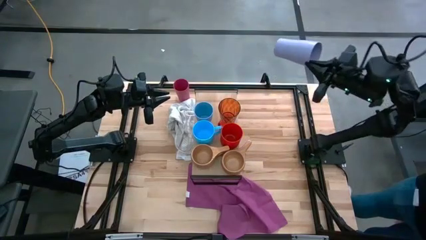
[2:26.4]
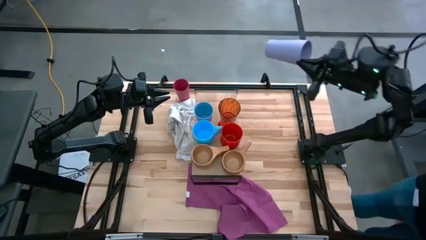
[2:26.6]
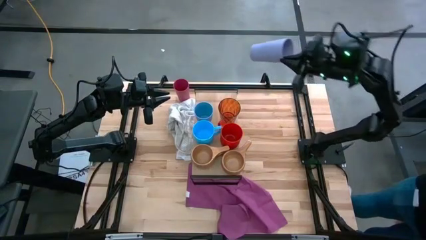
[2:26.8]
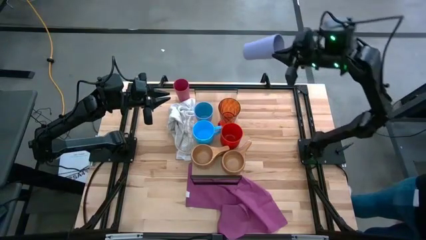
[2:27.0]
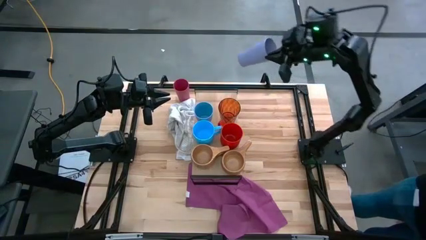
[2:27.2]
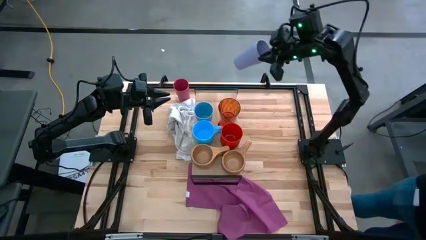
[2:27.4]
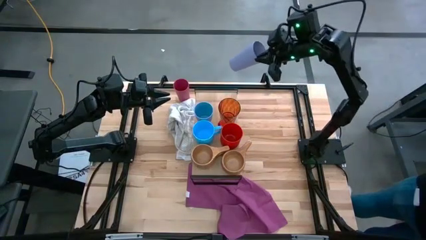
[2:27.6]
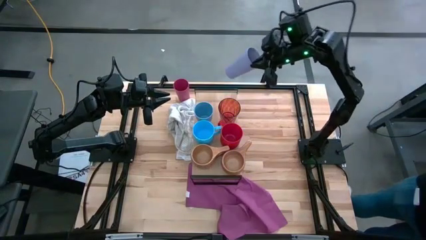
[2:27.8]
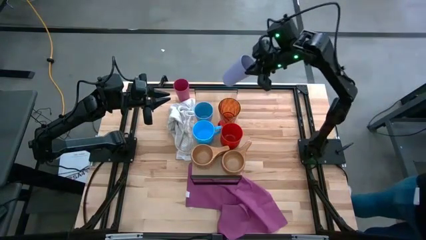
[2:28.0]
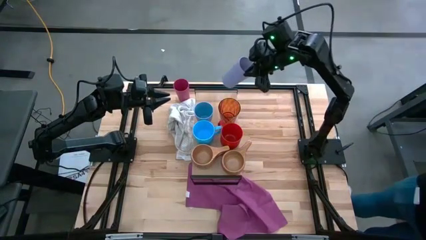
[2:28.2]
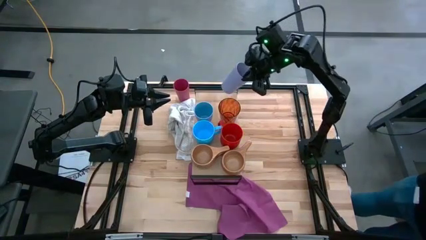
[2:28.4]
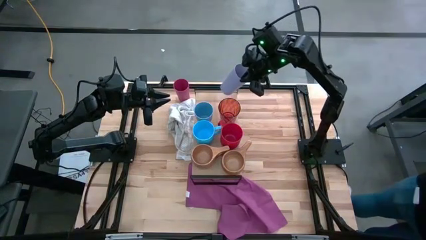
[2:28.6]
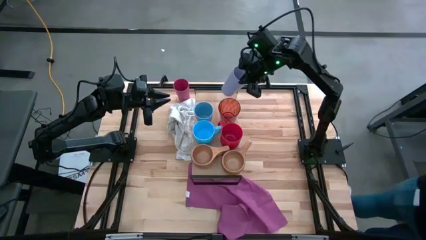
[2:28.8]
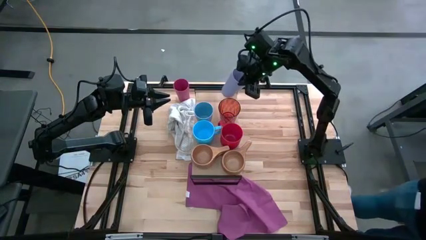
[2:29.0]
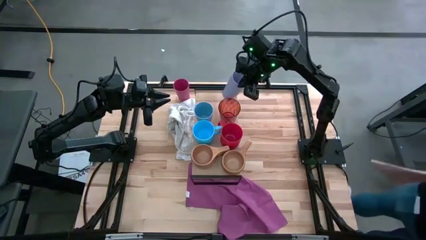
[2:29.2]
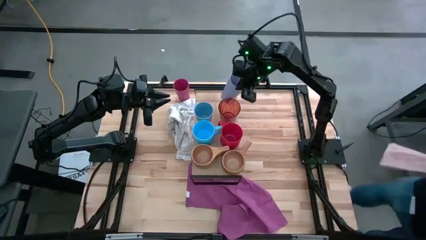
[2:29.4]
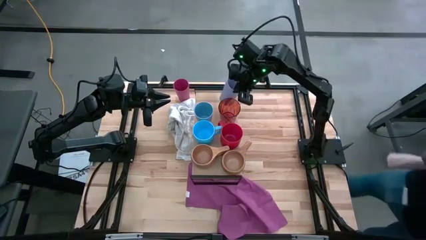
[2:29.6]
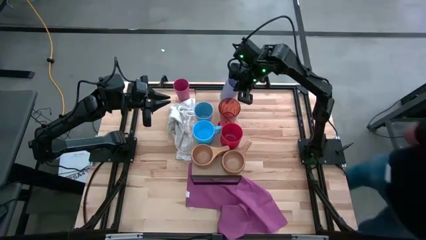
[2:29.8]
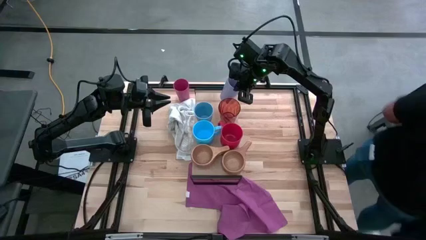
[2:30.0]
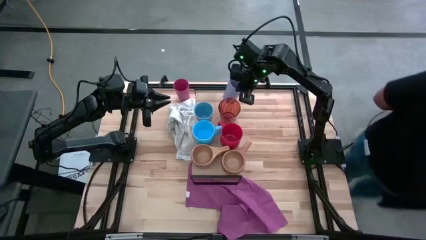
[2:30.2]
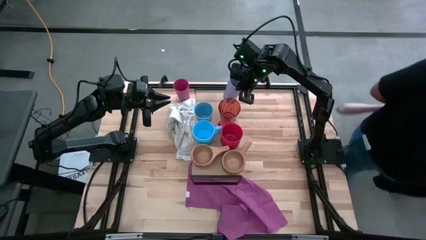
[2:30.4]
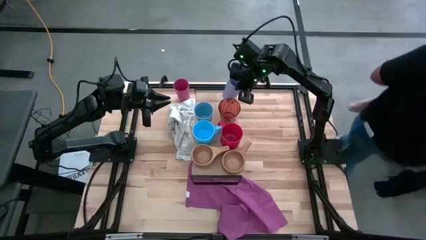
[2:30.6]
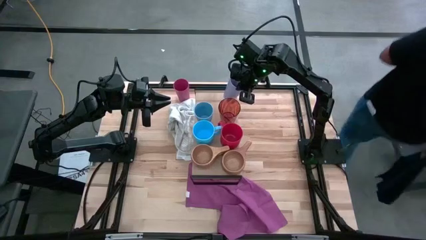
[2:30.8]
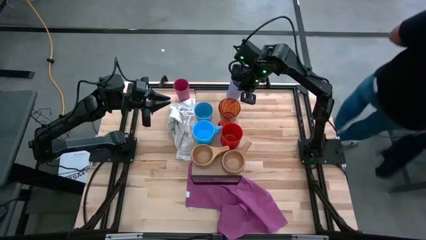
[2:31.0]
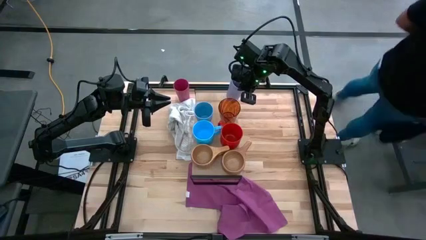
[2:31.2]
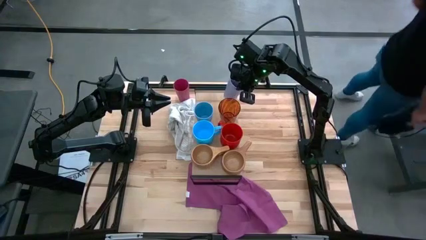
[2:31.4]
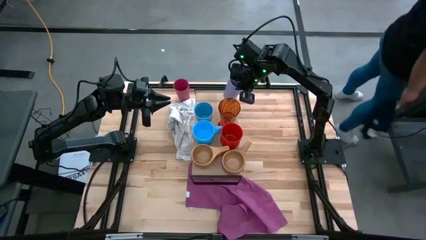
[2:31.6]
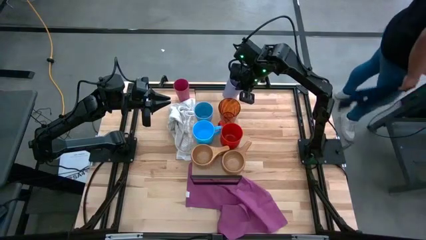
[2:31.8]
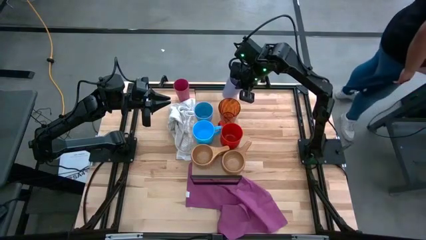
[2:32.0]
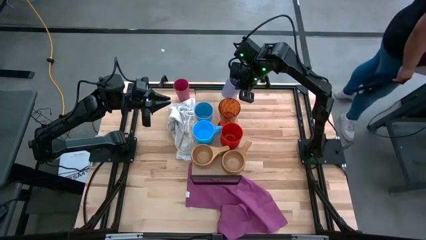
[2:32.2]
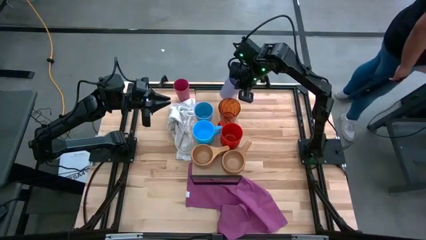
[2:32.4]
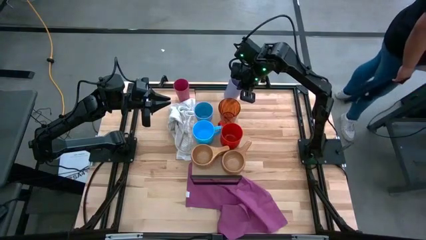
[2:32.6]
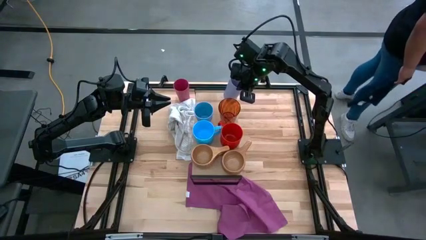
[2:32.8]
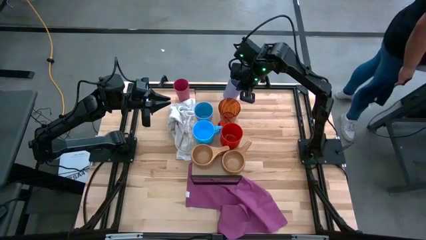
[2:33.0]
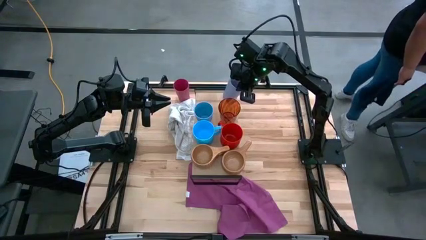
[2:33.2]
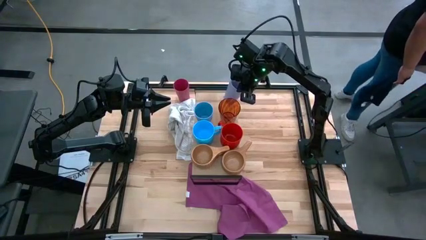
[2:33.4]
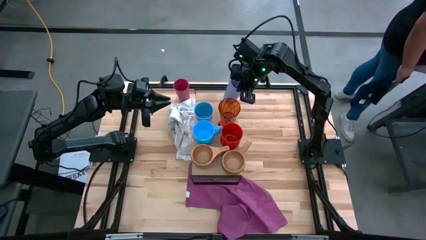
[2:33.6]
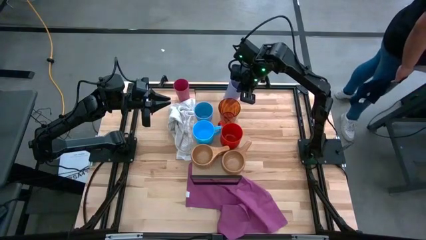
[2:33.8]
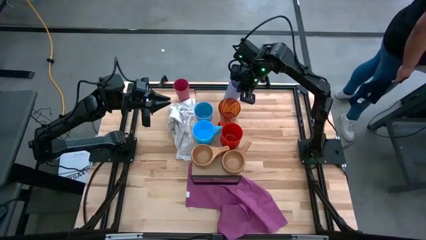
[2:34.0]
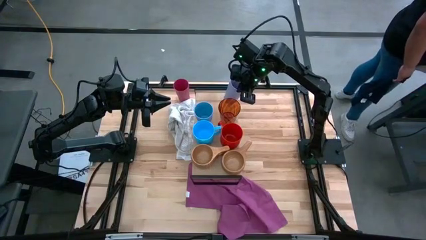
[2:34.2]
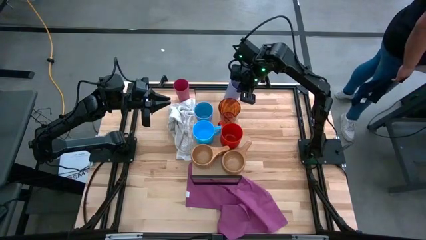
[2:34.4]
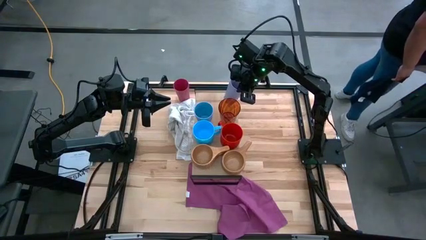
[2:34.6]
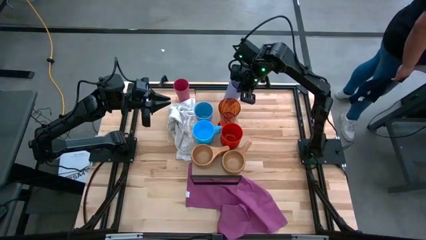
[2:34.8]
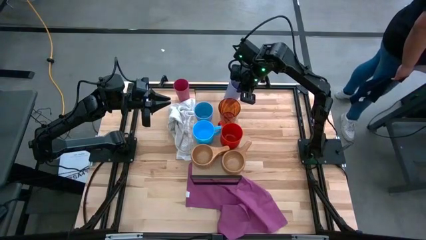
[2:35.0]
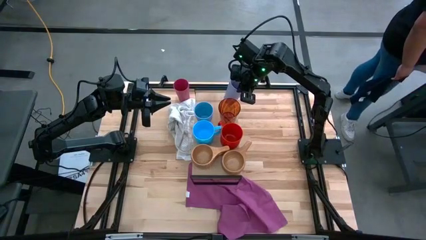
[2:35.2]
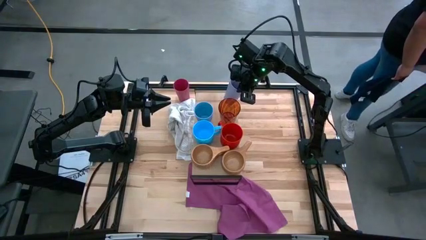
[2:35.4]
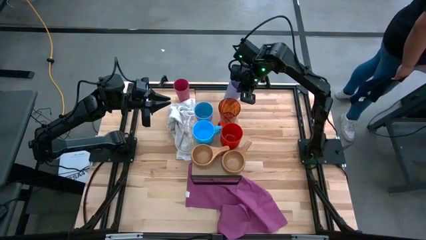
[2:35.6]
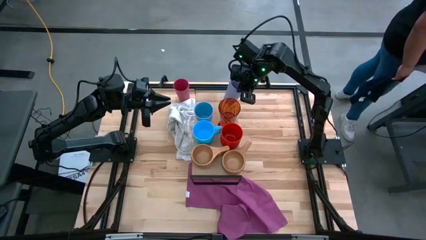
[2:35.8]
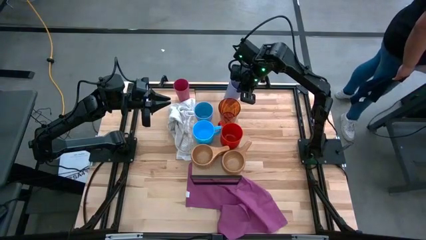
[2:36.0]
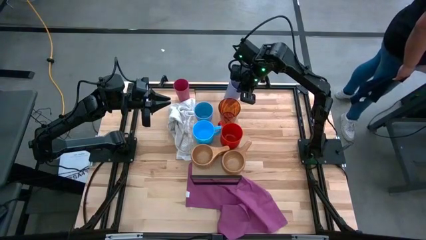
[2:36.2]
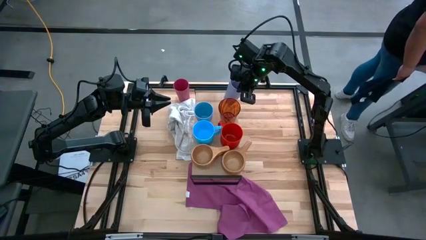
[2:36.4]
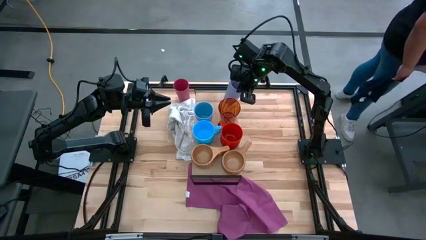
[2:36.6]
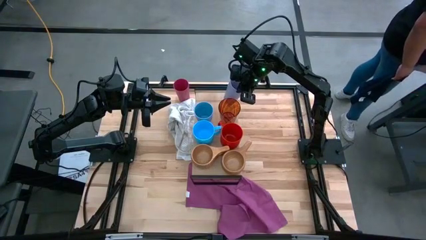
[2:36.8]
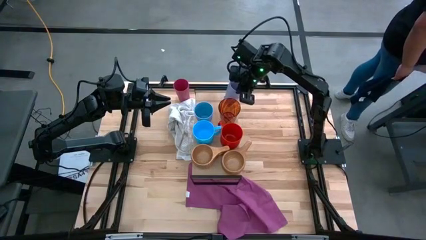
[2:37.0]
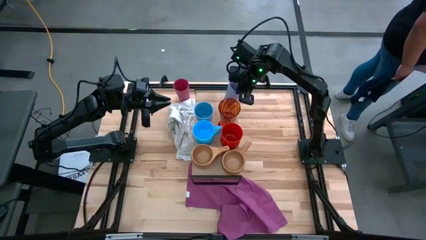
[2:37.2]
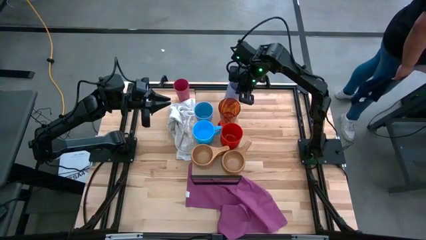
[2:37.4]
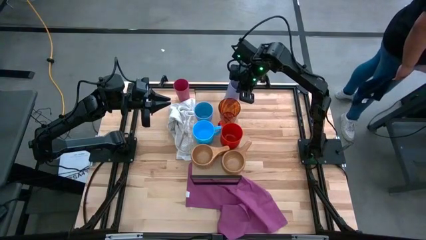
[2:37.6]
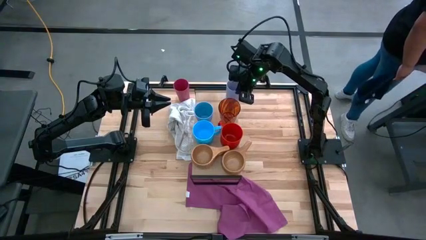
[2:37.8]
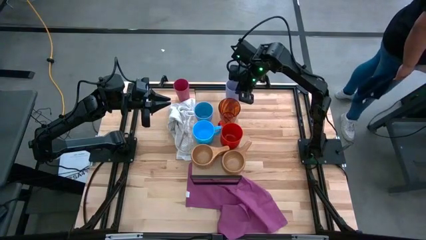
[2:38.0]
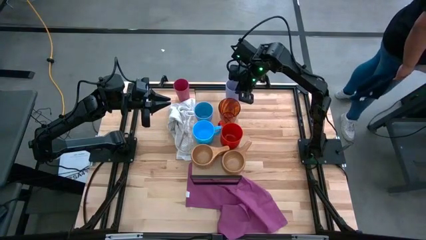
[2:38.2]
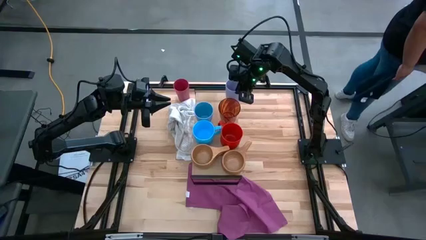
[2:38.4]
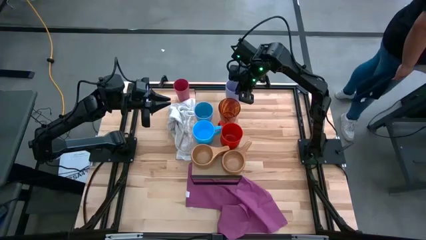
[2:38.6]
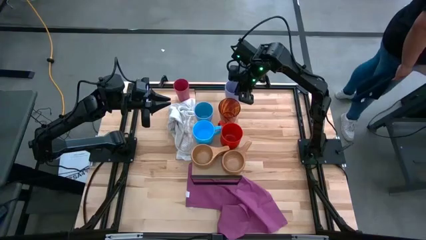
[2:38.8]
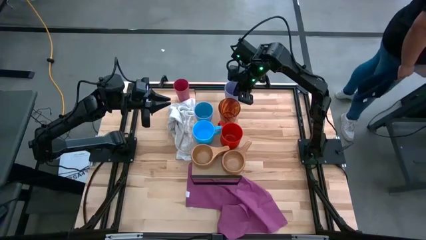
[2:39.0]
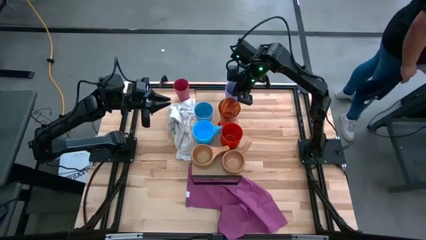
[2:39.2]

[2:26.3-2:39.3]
Task: Stack small to large cups/mugs on shelf
Put the purple cup on the shelf

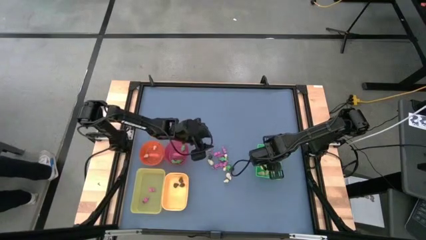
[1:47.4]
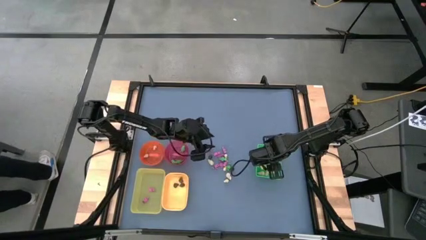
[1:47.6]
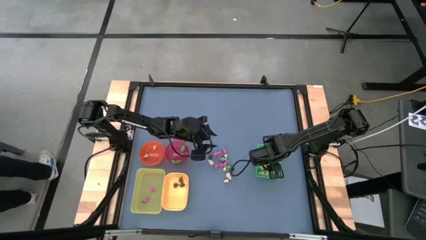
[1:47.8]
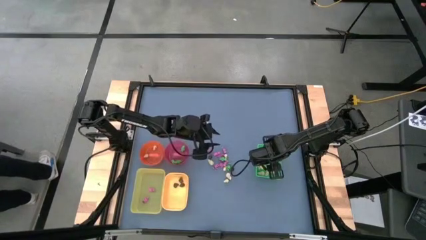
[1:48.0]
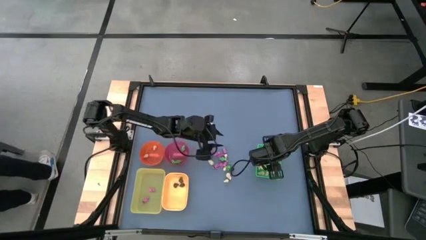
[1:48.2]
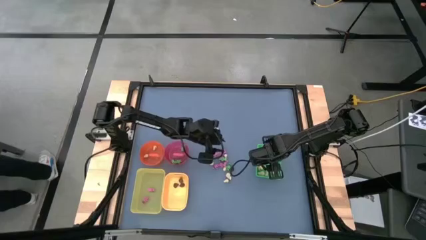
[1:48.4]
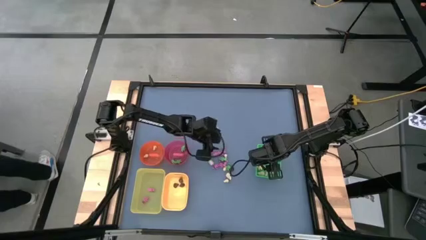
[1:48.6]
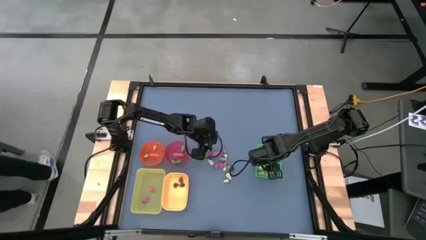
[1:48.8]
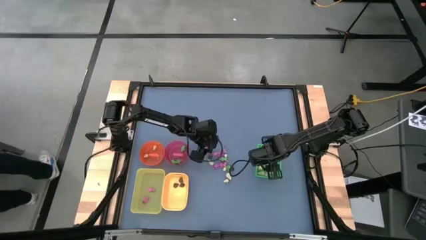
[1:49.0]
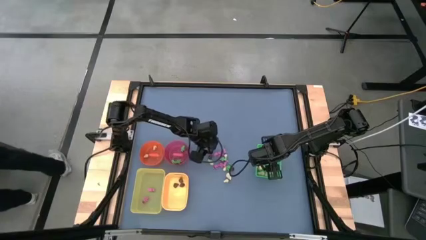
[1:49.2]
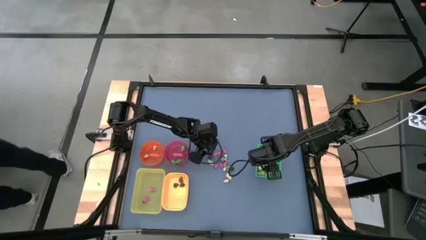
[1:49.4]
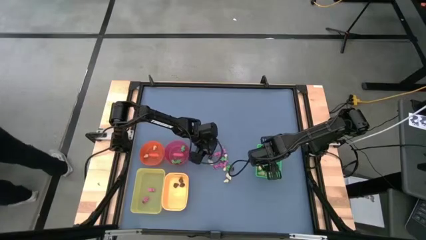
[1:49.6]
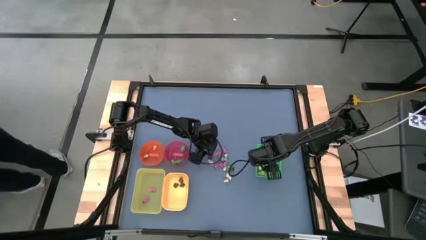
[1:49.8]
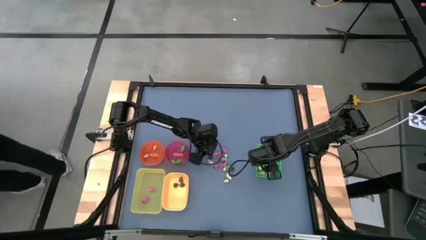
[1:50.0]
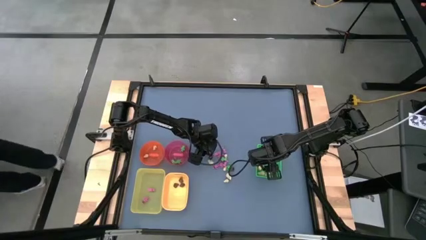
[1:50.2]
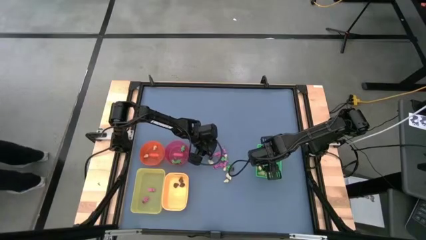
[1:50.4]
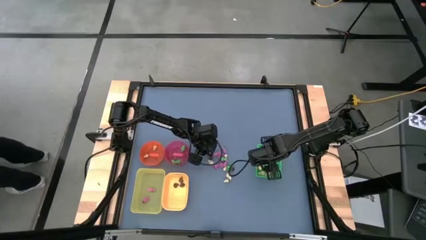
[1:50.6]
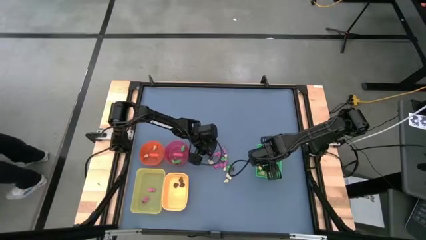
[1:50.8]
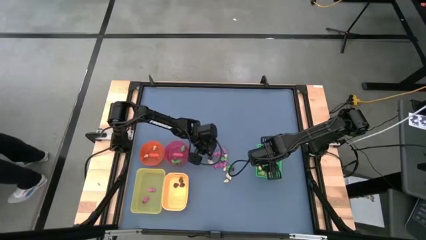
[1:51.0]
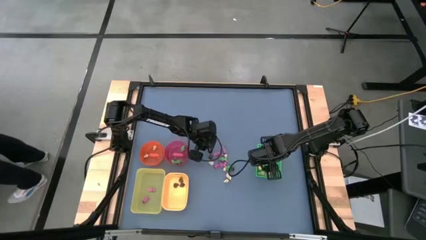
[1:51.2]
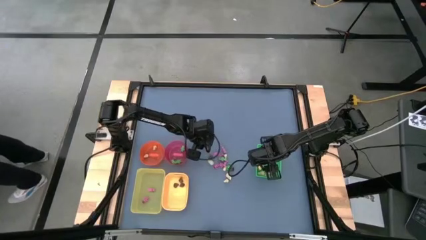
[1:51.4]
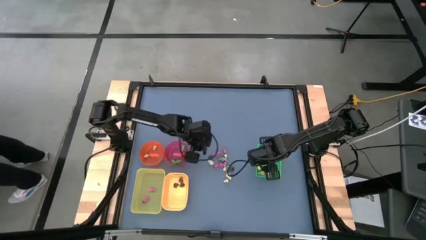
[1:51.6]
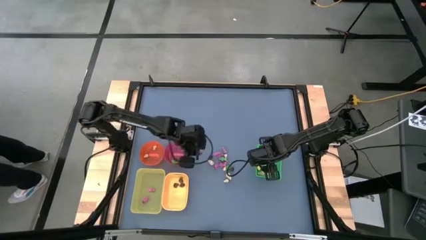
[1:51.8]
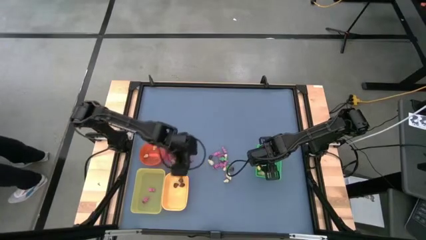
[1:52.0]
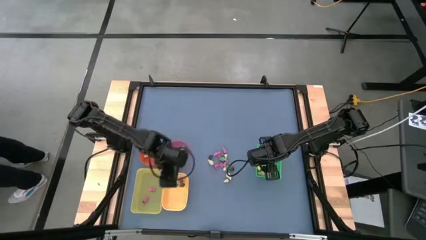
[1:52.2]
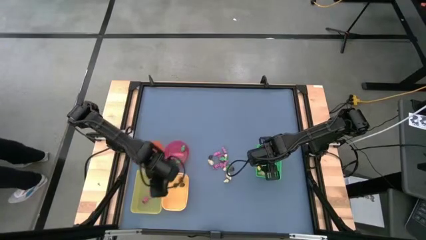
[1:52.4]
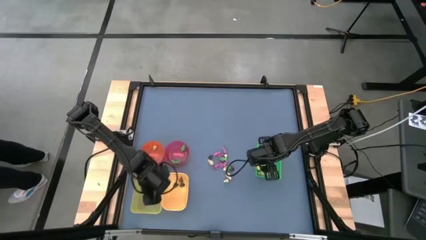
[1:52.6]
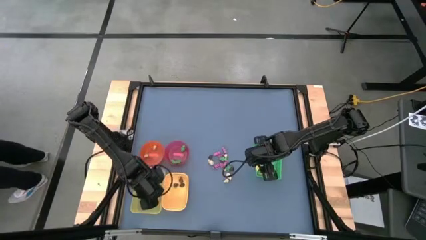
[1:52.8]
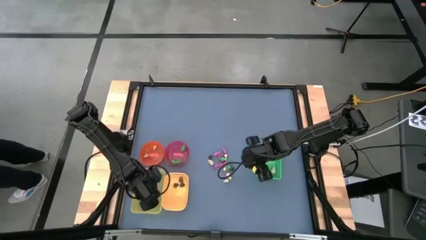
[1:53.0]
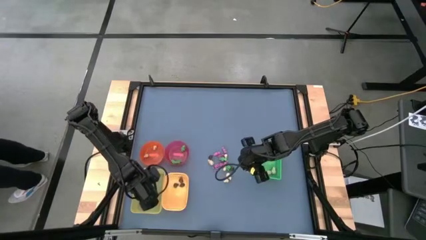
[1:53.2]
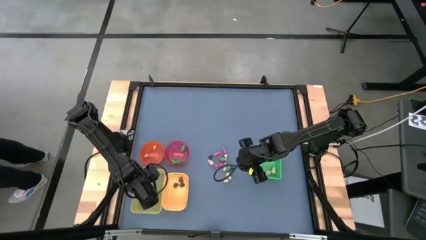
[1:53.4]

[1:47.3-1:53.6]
Task: Sort Halloween decoration
Put the pink skeleton toy into the light yellow bin
